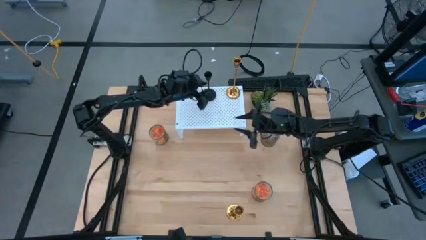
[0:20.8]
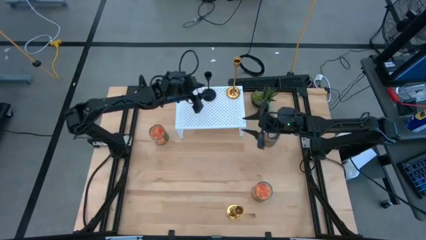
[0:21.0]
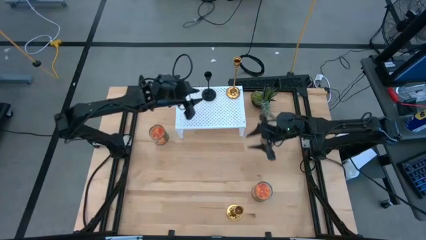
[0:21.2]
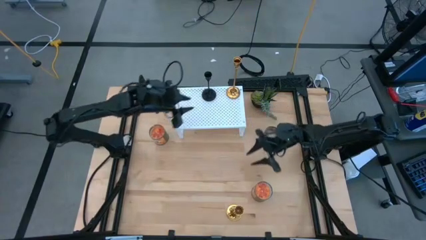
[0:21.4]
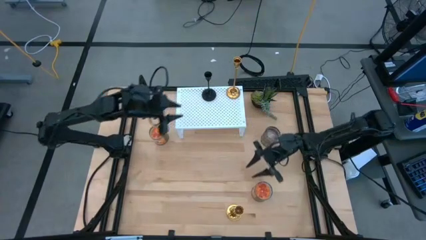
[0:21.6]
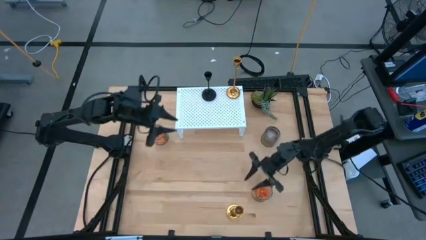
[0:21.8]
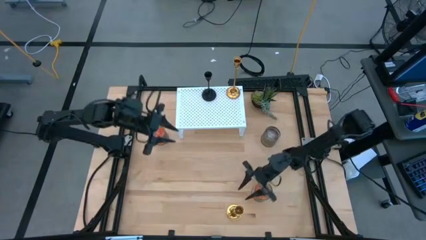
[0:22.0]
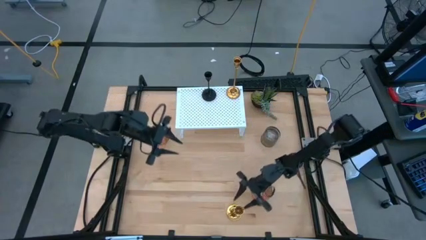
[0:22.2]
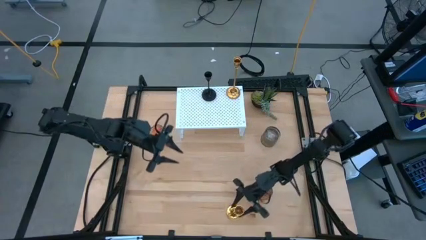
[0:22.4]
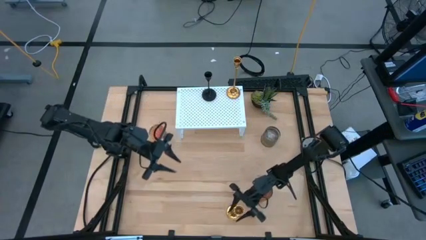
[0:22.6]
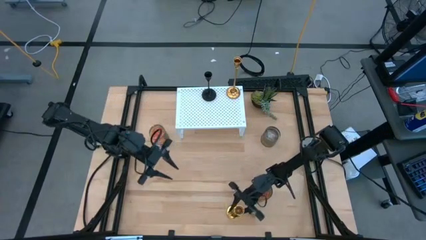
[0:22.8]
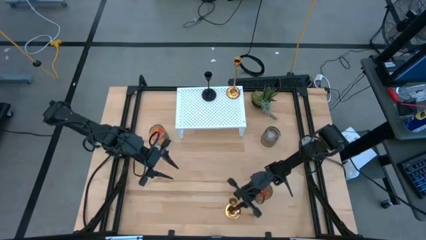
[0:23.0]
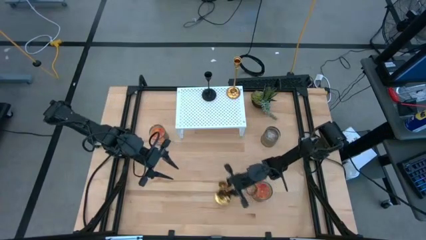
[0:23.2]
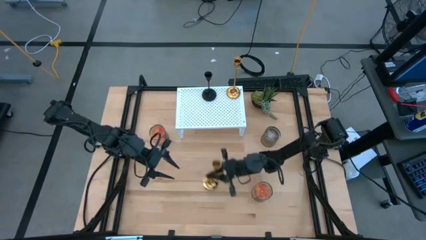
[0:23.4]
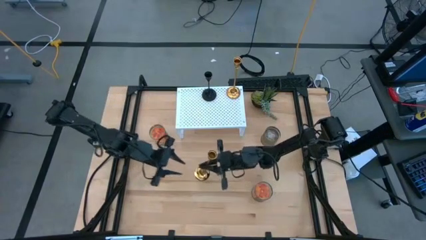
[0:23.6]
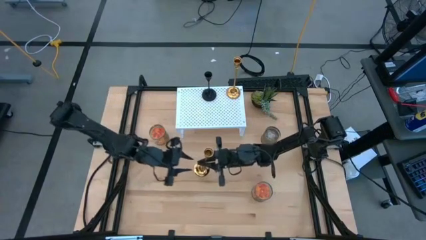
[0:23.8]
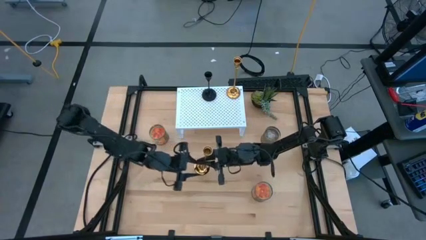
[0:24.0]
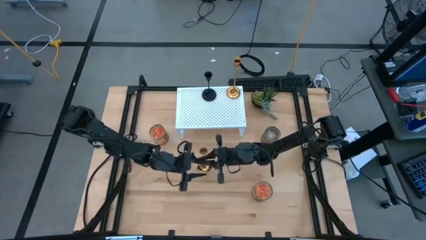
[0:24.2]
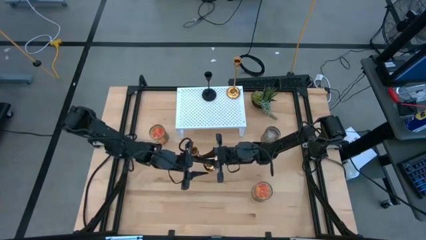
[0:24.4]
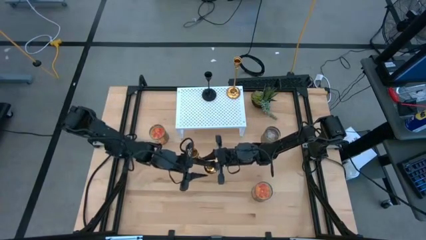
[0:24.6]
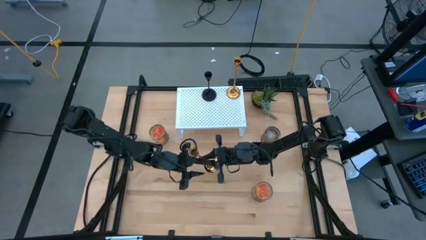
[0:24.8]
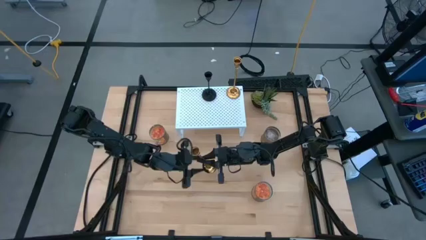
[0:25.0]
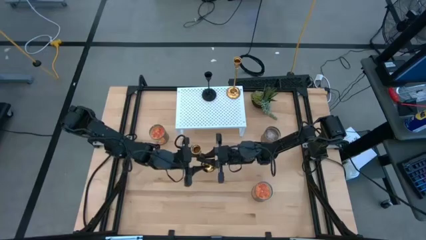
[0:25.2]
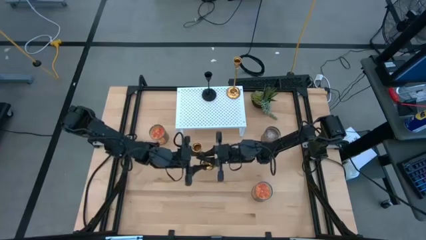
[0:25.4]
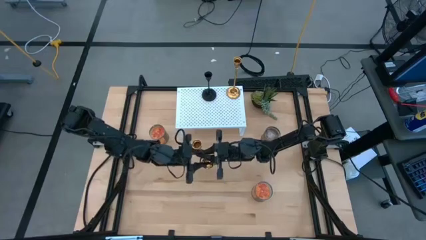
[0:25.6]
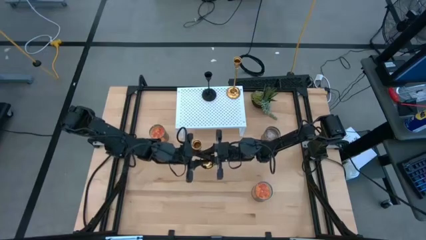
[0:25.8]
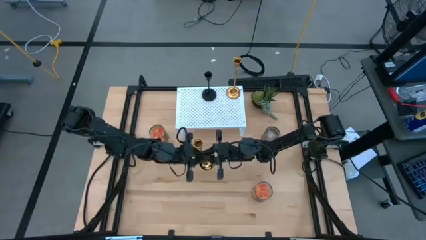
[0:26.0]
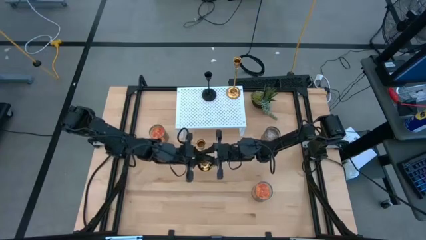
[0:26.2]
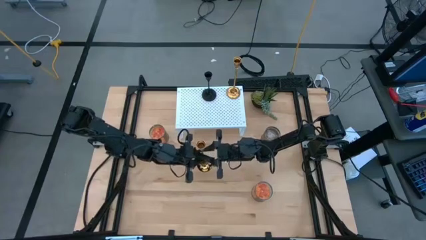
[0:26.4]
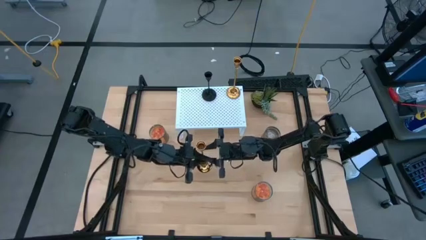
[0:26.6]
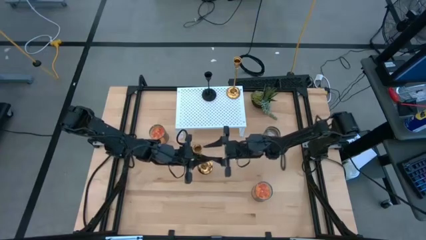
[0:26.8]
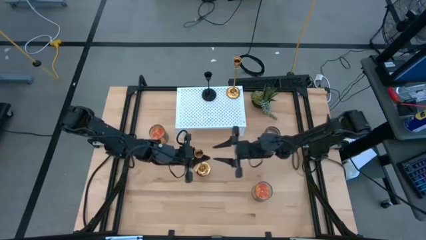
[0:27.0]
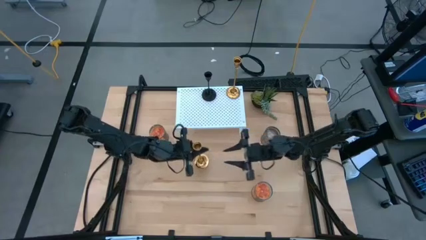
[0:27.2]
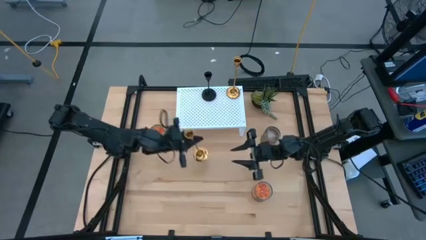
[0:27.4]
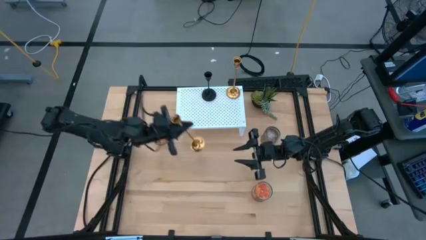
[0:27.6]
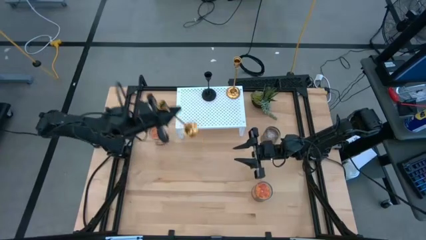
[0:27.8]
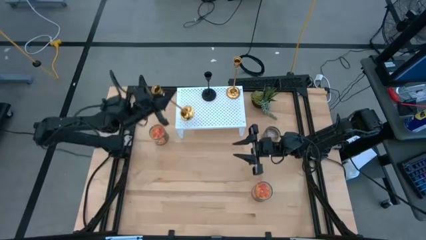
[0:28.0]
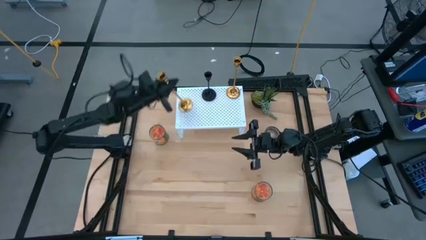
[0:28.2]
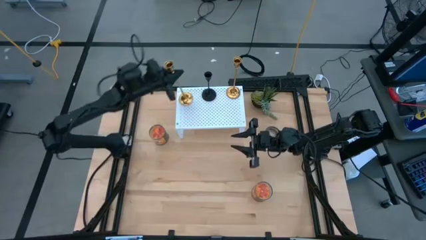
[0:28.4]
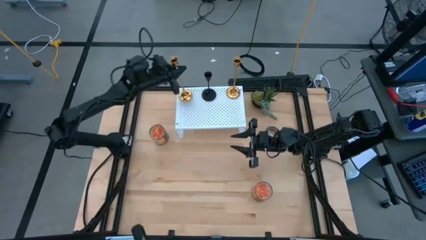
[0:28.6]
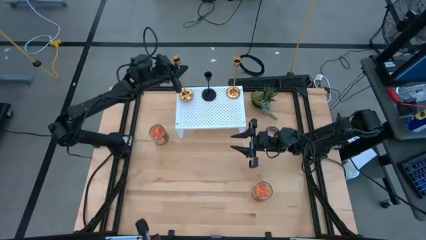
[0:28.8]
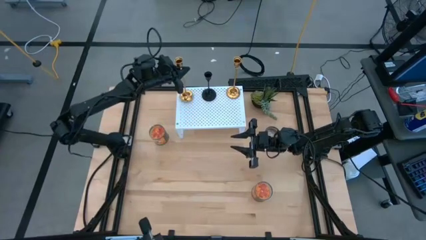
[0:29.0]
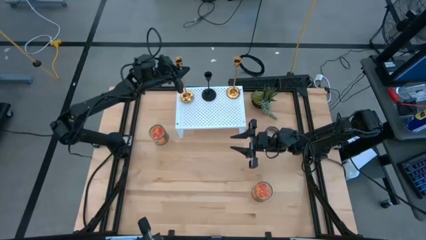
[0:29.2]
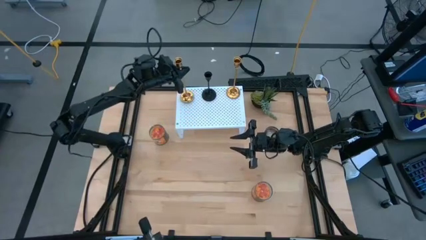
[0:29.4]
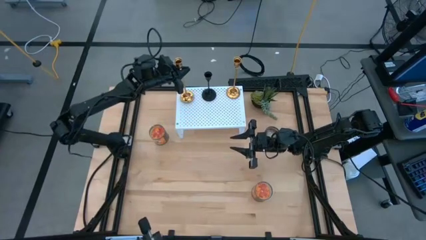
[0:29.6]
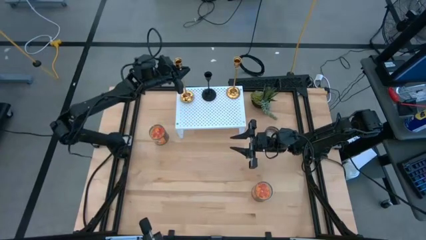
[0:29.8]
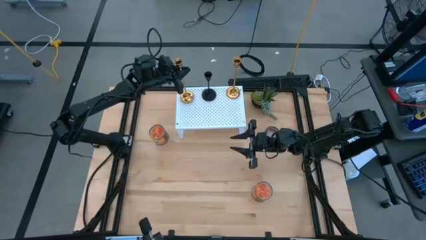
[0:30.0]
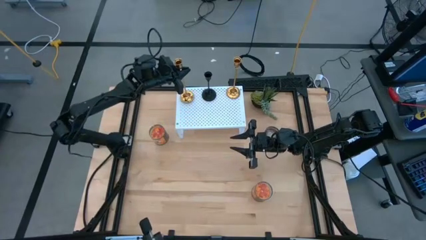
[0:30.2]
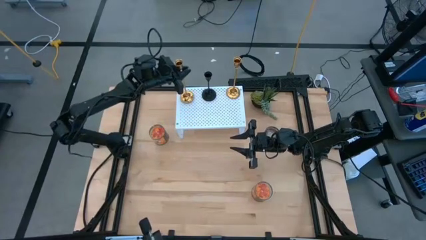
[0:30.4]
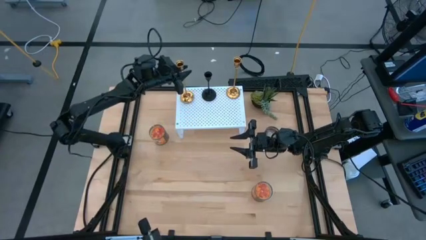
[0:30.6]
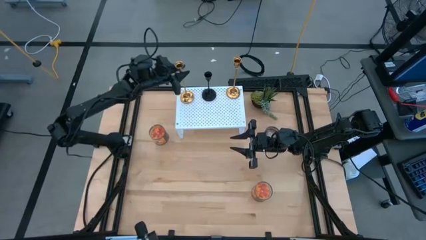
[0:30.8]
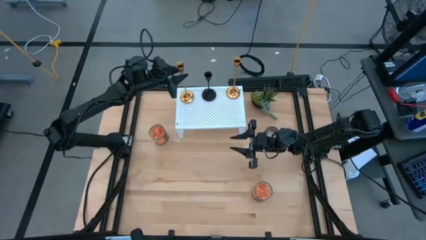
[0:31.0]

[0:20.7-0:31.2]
Task: Pick & Place candle stick holders
Put the top gold candle holder on the shelf

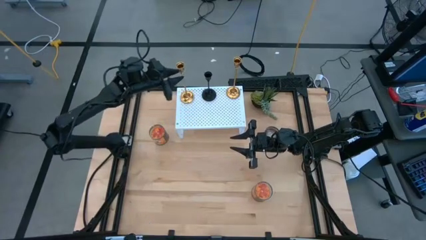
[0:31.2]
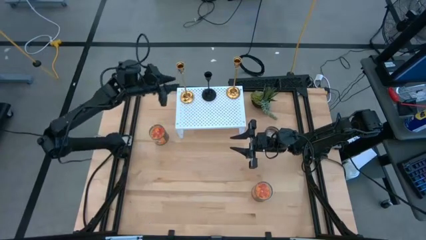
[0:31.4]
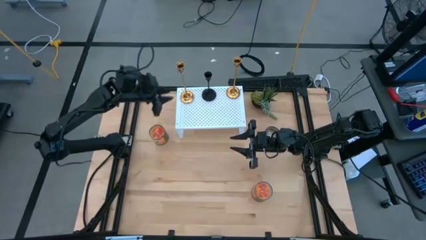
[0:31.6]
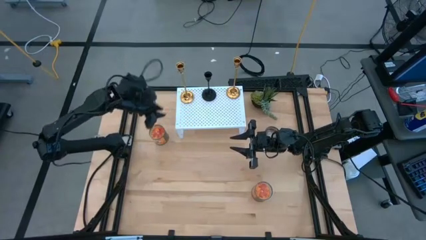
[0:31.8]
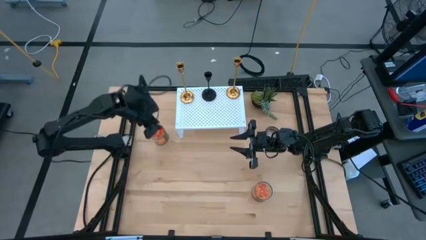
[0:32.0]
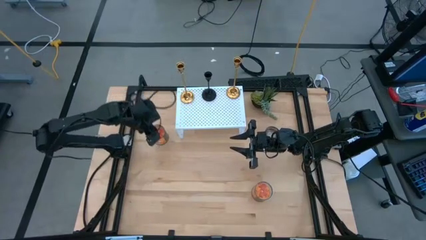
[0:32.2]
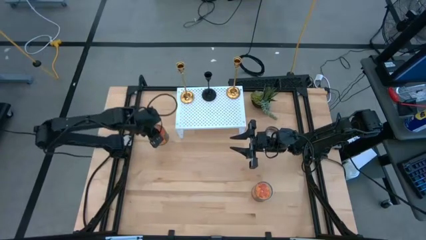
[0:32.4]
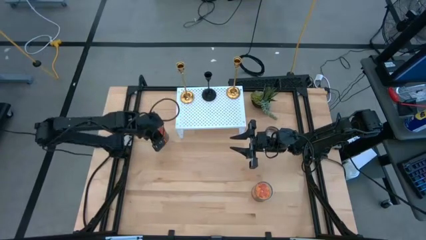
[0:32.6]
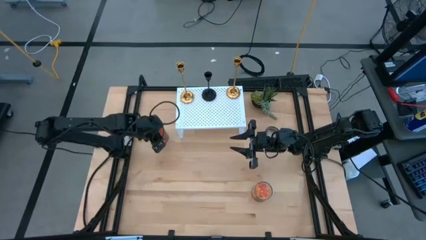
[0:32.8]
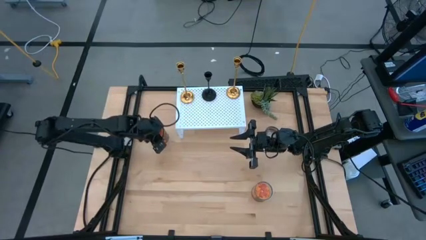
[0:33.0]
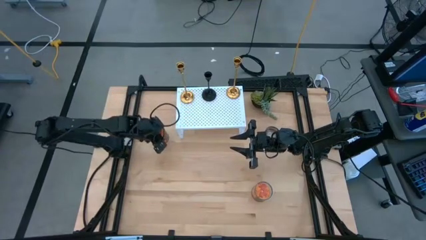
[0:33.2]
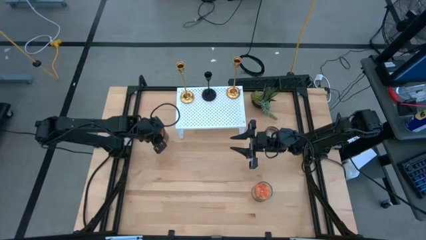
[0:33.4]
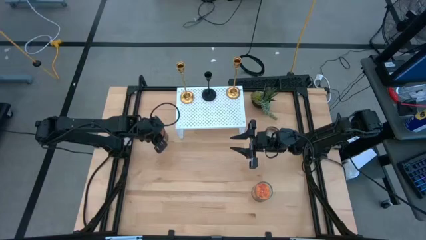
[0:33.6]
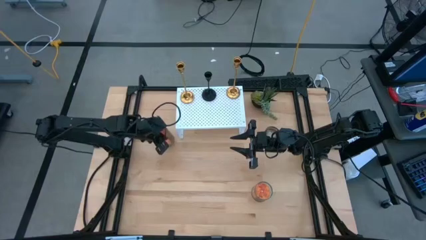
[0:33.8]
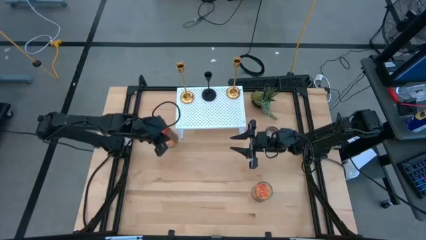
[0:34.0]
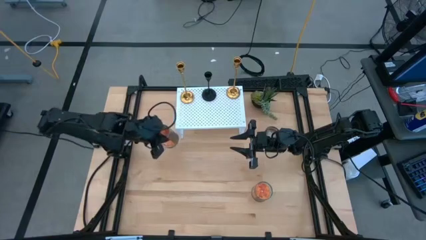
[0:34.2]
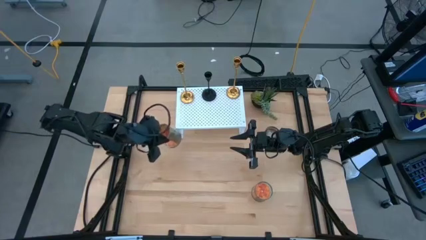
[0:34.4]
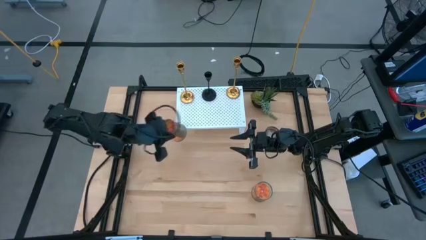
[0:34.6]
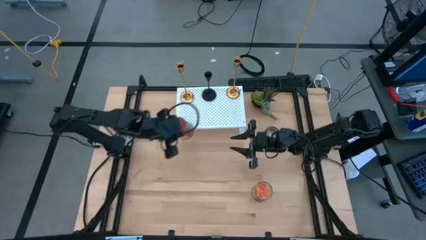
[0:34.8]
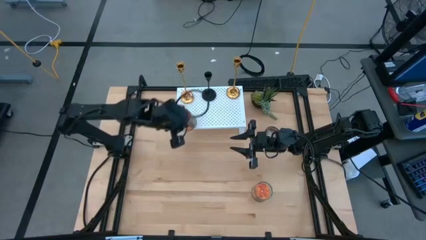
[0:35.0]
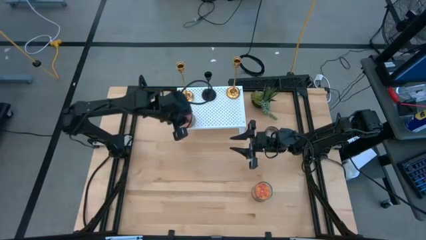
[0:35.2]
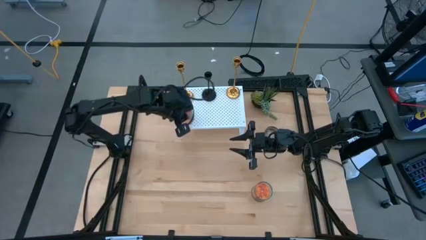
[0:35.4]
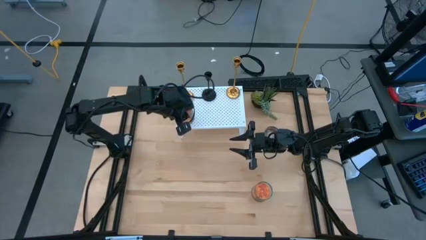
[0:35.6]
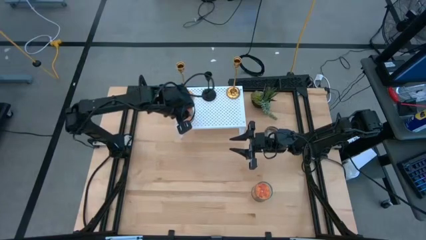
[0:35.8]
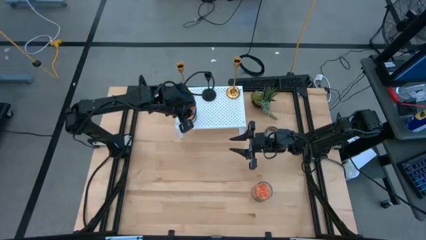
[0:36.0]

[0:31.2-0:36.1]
Put the top orange scented candle on the shelf

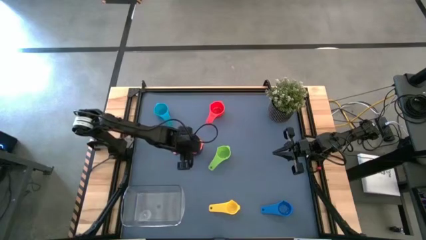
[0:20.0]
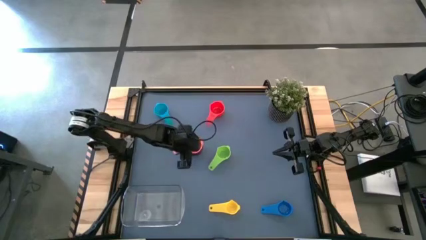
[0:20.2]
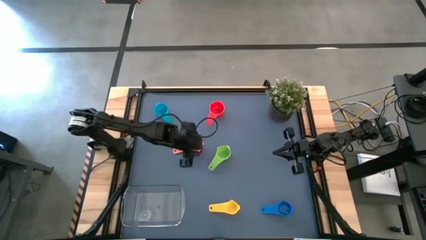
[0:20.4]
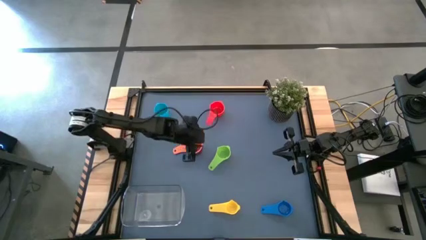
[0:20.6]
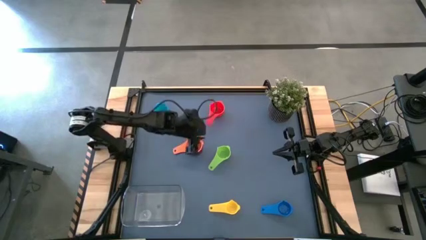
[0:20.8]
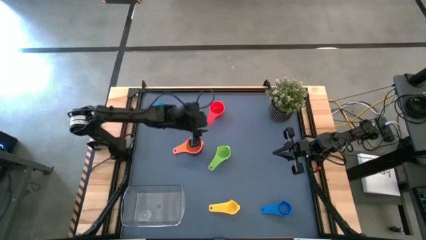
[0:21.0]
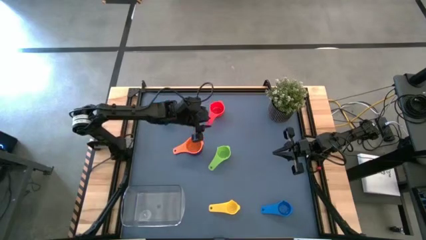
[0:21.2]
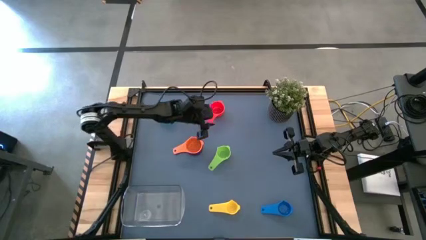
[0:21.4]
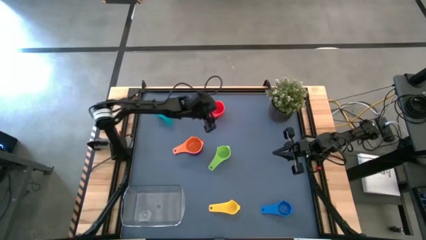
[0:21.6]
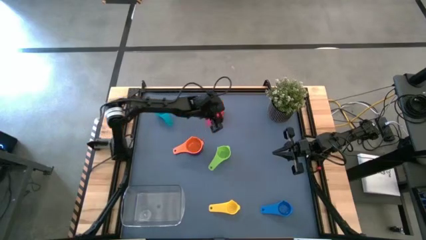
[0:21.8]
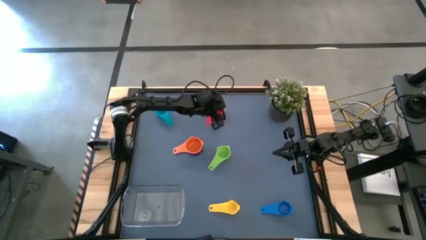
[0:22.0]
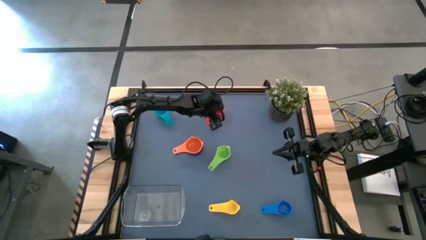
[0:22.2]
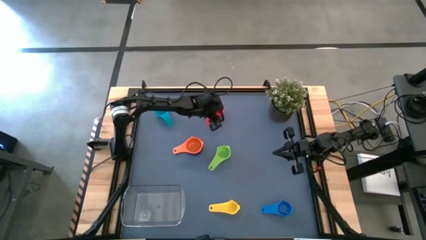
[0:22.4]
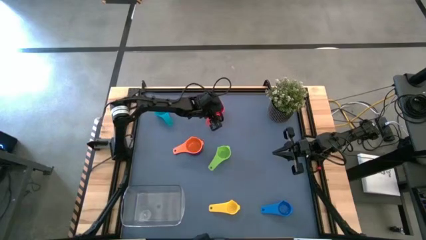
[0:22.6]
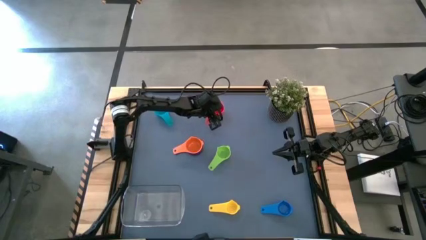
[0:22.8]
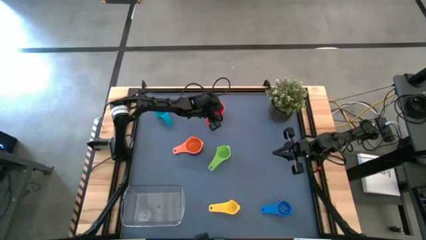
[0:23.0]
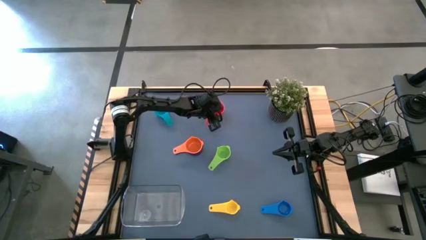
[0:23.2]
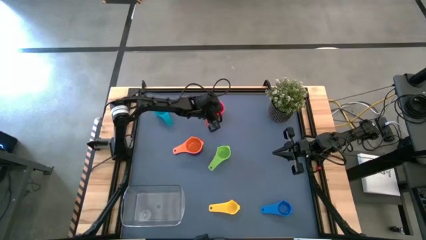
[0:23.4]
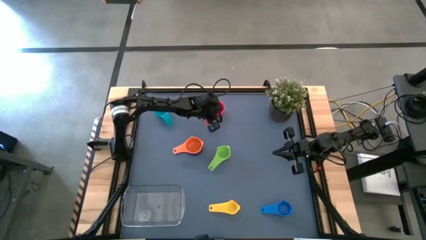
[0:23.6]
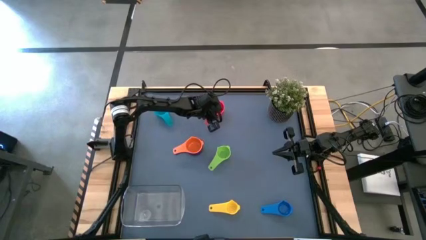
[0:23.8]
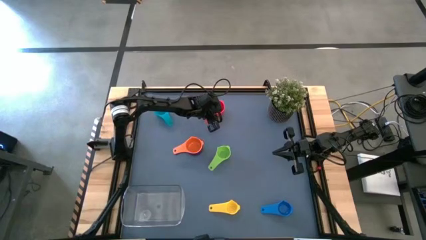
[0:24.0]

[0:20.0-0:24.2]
Task: Nest measuring cups in basket
Stack the red measuring cup on top of the orange measuring cup
